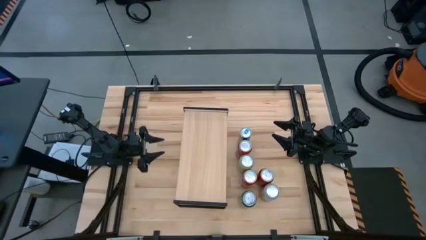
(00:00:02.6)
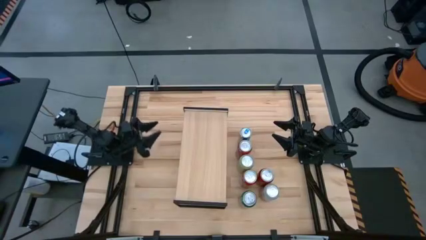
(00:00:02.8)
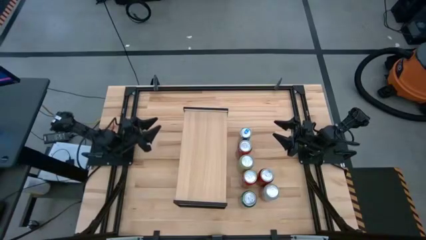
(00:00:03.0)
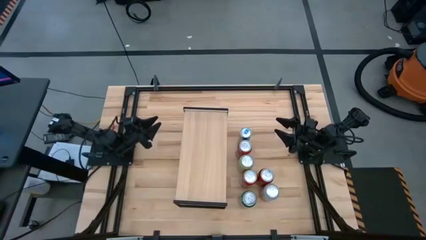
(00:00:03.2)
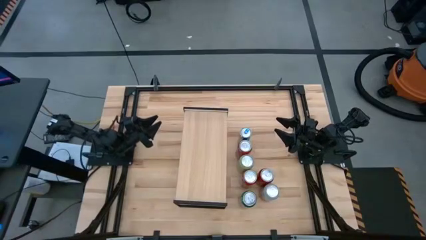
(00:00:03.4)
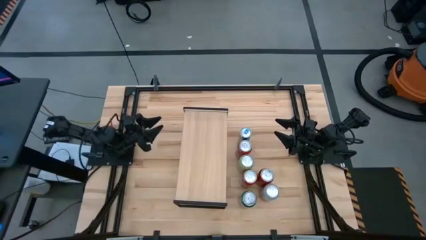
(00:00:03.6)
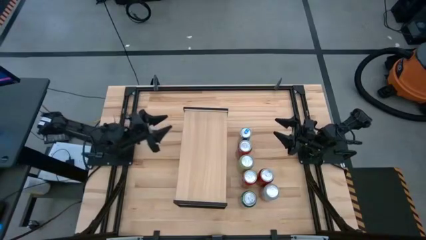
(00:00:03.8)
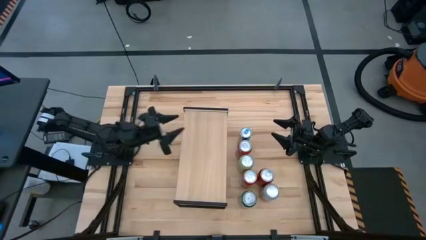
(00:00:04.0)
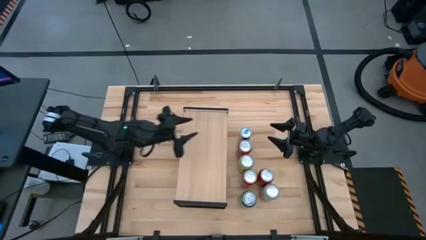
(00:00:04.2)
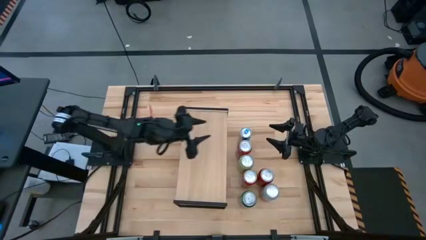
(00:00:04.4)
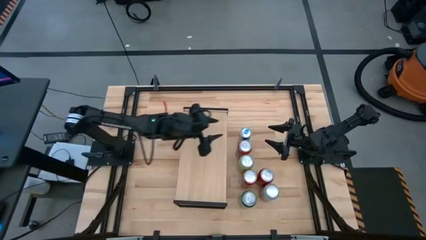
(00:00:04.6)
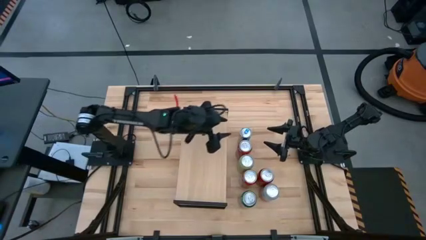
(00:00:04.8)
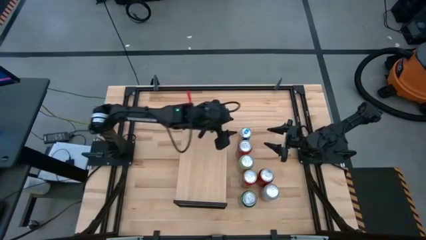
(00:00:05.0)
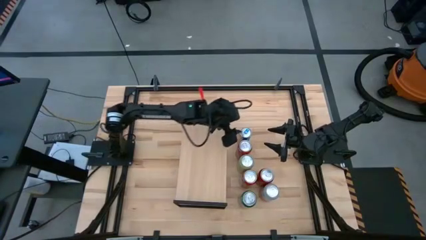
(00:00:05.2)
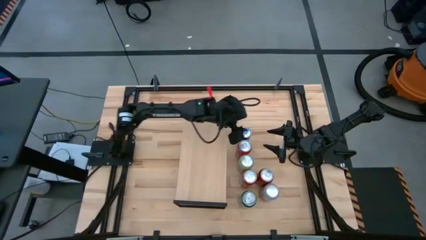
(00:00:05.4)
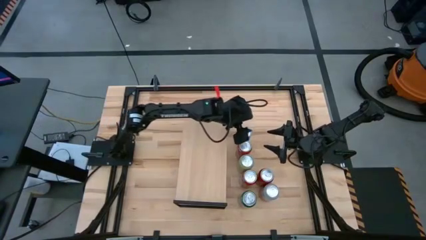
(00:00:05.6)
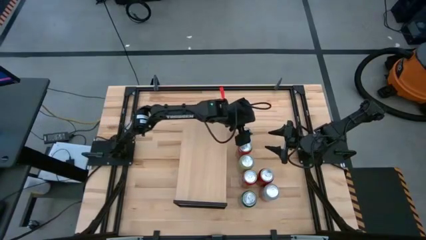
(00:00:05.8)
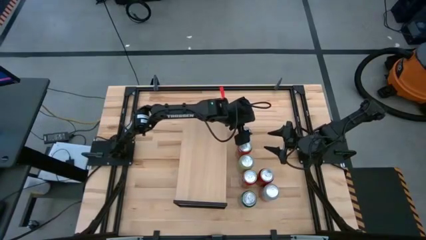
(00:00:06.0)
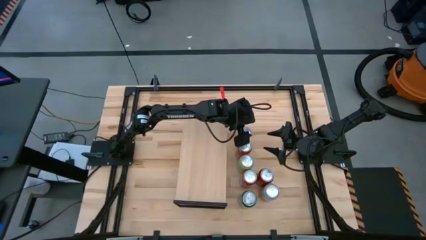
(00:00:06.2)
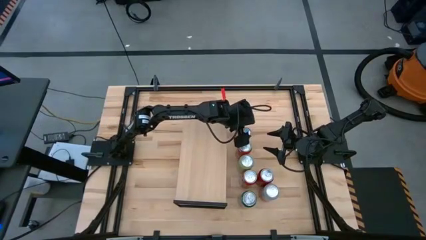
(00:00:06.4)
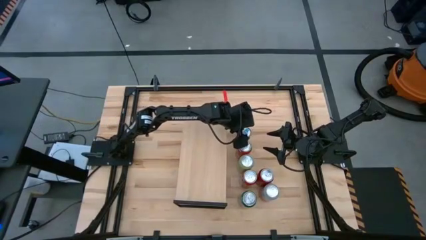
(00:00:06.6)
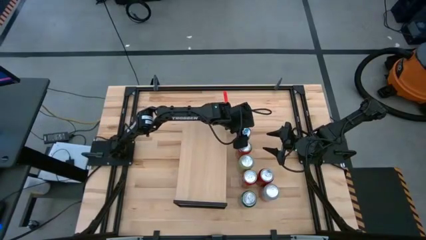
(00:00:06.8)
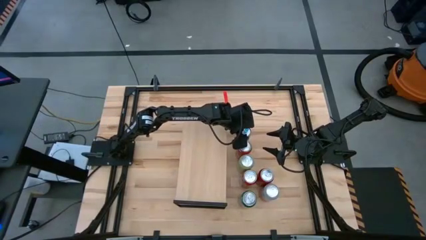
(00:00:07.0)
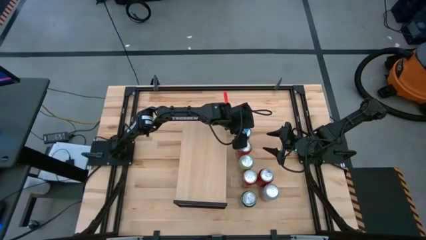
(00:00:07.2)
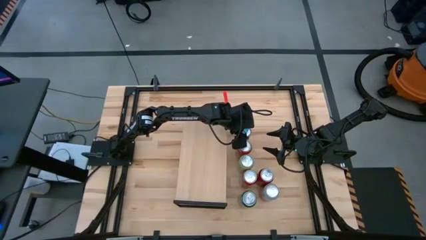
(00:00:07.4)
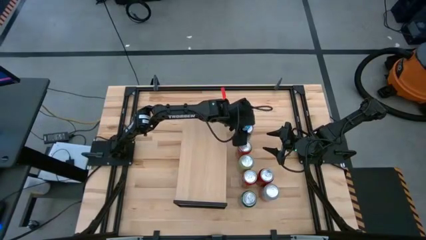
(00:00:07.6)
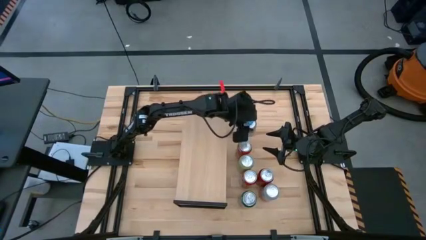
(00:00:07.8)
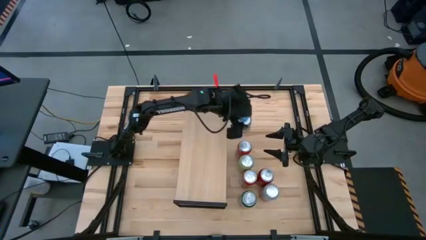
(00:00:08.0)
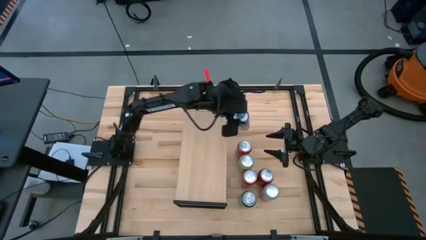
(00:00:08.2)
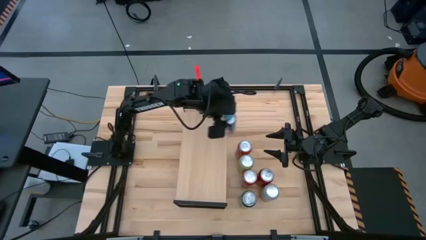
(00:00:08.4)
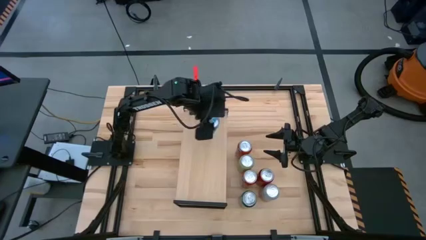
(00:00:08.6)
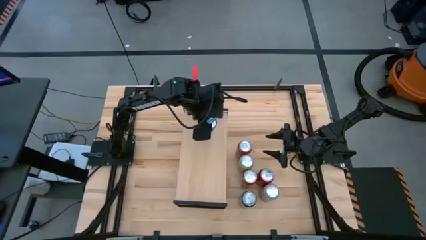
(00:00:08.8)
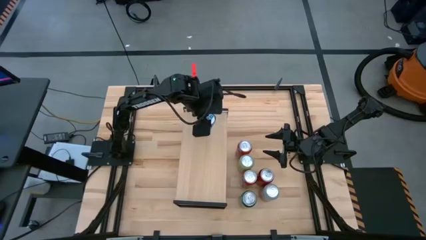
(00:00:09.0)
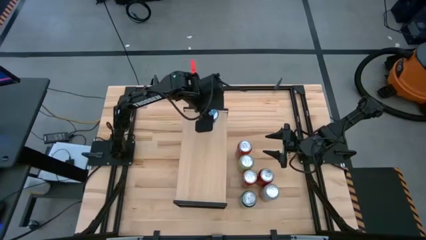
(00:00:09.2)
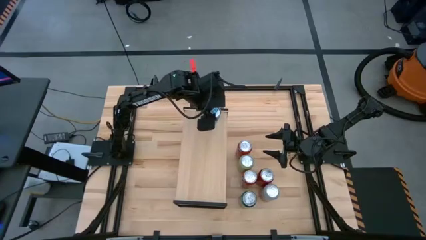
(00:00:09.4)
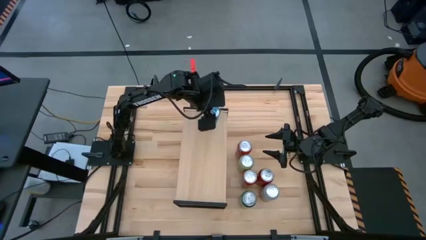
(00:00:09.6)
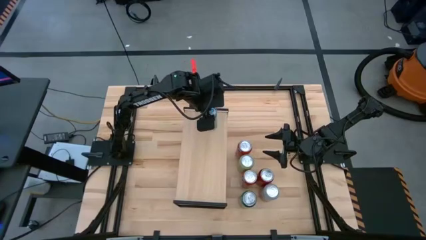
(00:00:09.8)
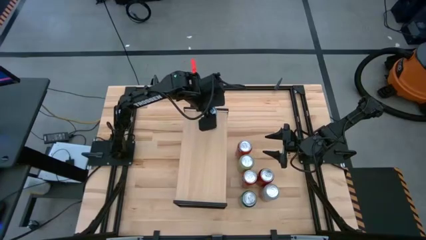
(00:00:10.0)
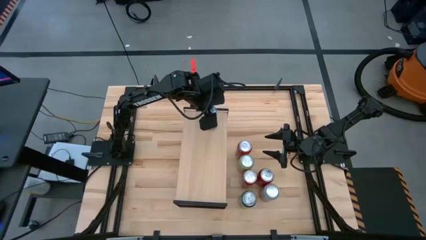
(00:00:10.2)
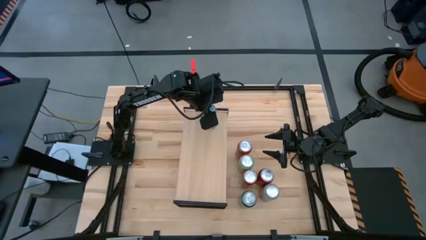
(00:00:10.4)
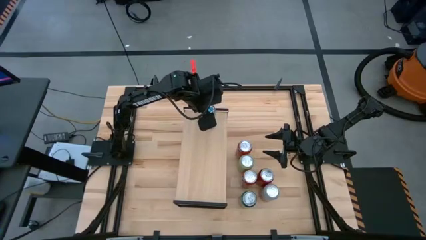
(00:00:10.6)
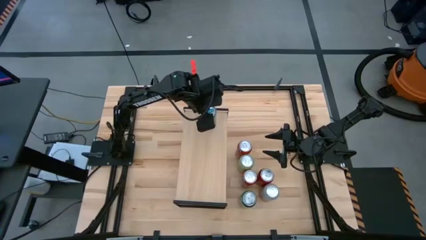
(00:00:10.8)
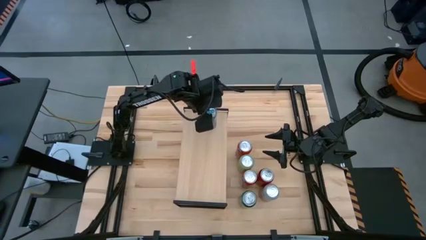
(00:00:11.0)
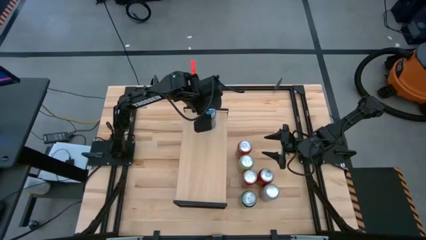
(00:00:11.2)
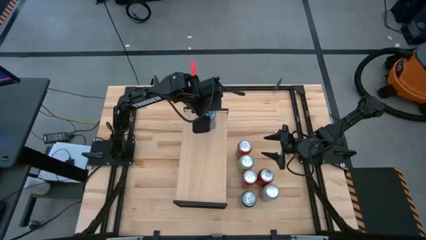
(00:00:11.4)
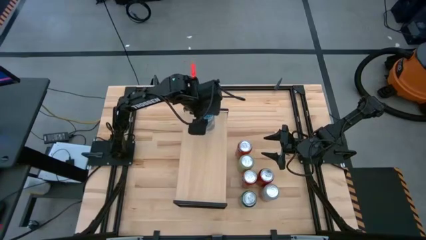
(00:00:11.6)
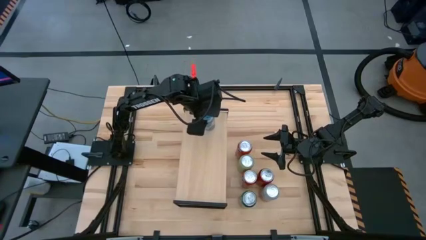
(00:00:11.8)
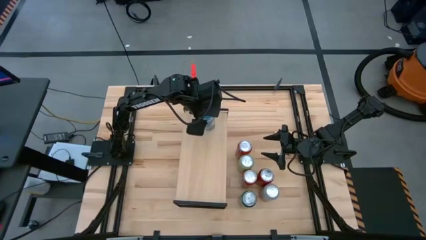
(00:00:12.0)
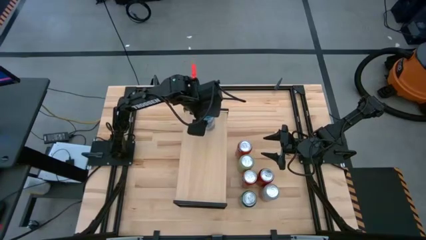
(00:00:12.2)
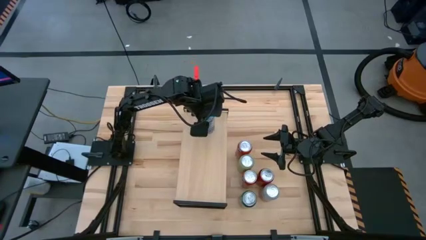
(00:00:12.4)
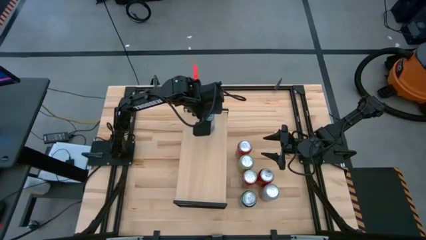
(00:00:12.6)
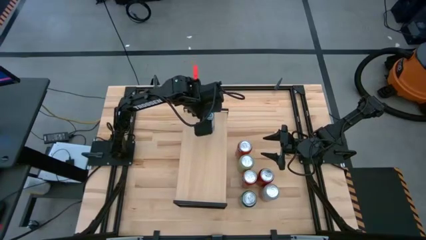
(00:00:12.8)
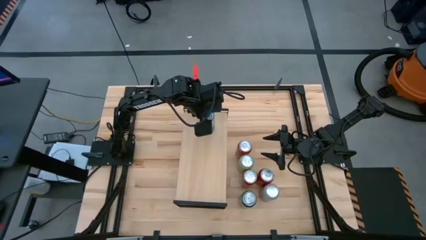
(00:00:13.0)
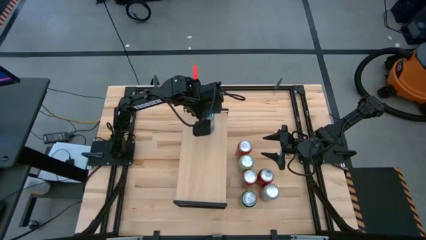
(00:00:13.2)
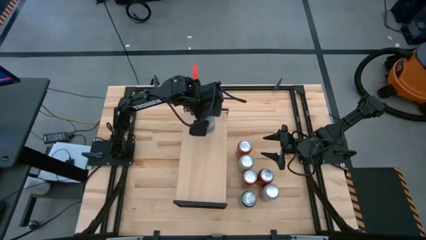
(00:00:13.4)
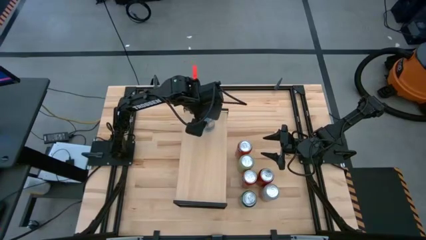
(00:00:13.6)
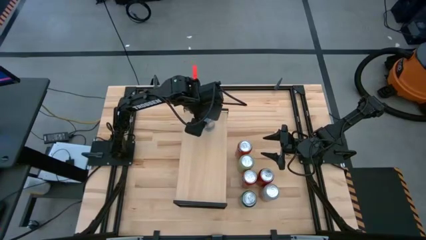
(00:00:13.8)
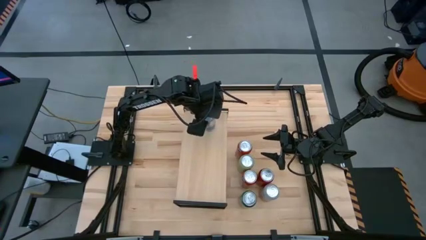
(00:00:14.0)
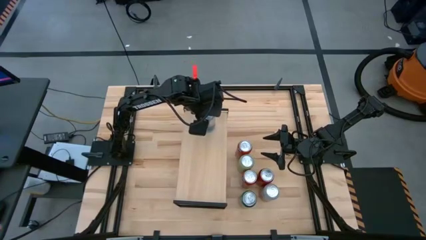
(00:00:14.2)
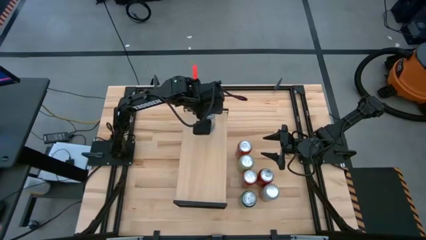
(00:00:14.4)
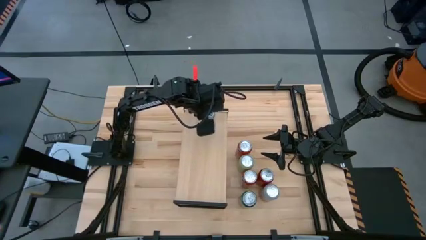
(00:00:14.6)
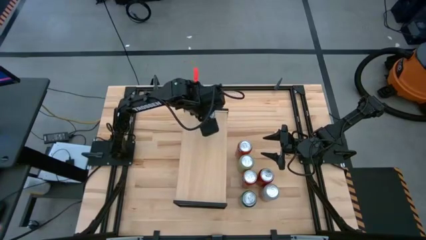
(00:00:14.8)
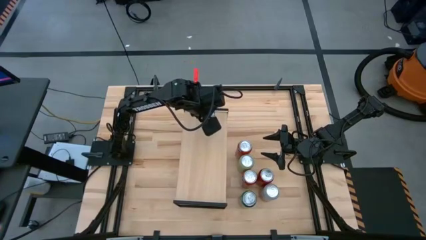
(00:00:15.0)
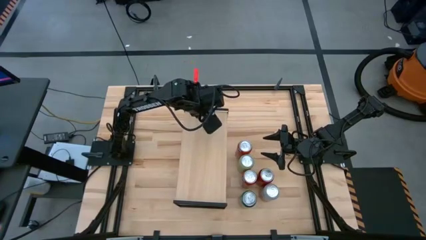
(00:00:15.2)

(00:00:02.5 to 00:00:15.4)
Task: Place canned beverage on shelf
Put the blue soda can on the shelf
